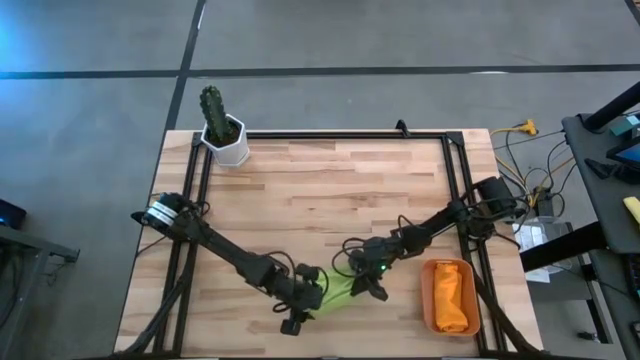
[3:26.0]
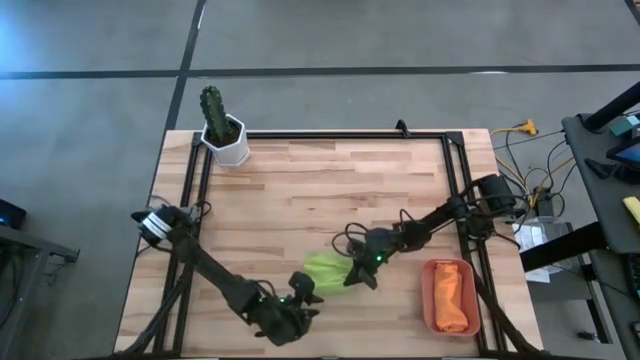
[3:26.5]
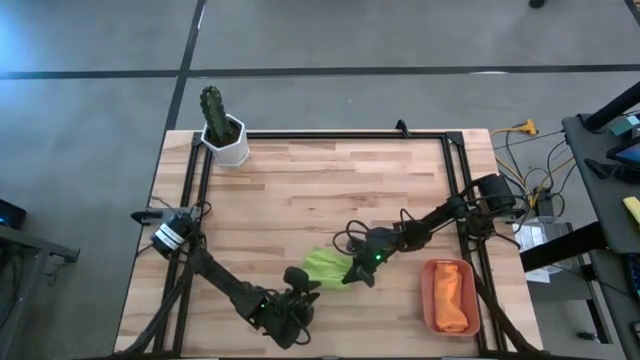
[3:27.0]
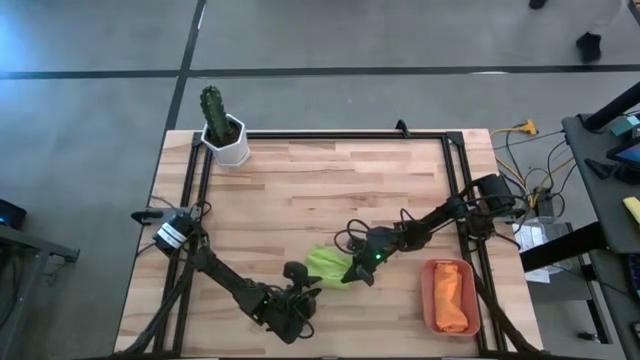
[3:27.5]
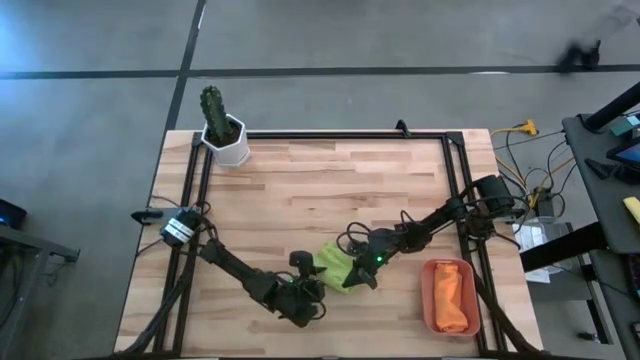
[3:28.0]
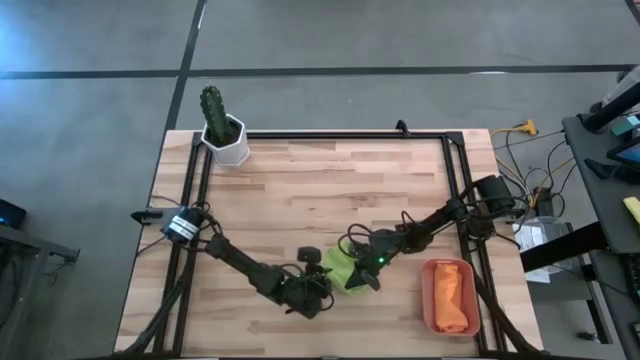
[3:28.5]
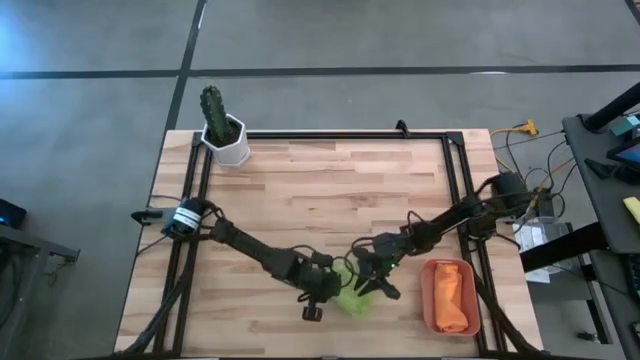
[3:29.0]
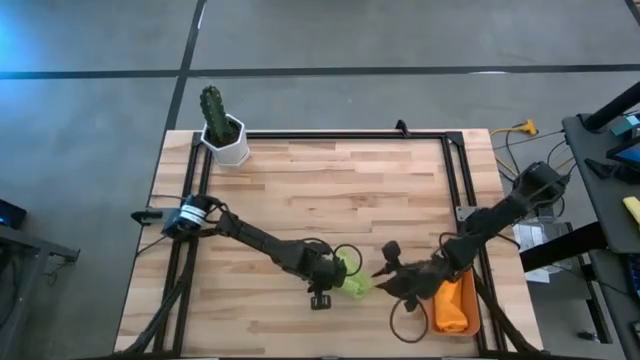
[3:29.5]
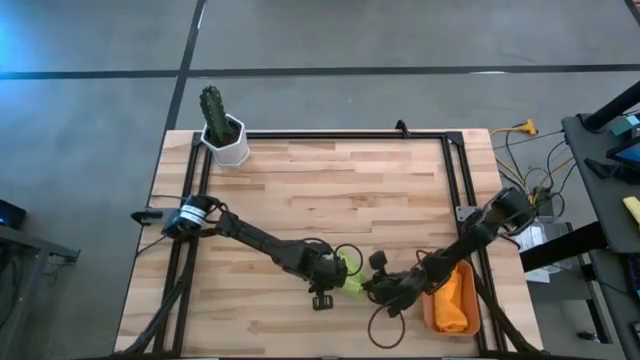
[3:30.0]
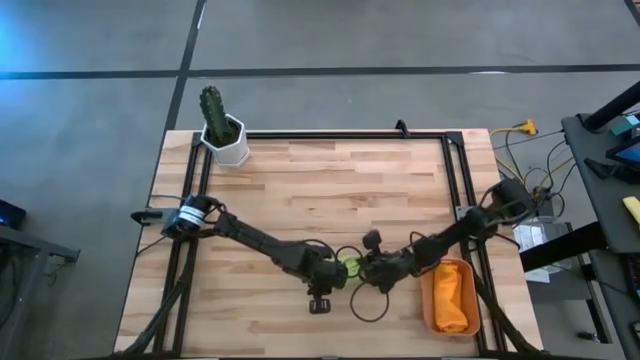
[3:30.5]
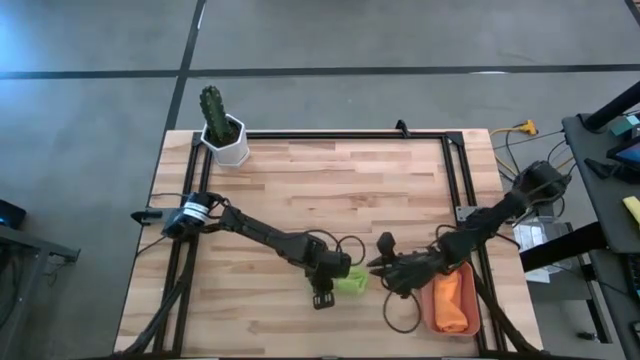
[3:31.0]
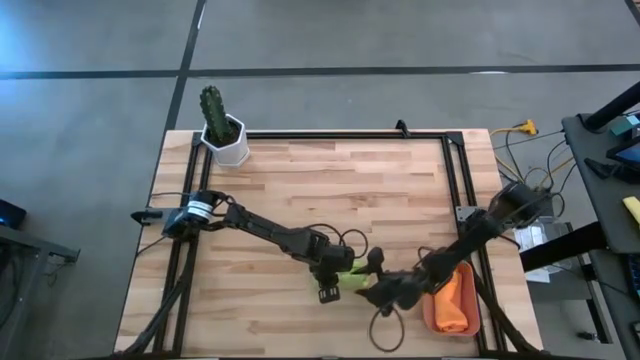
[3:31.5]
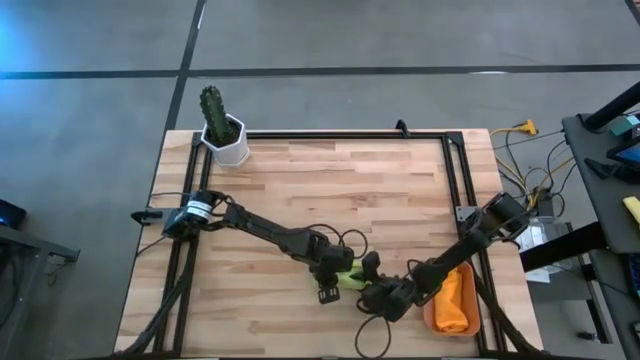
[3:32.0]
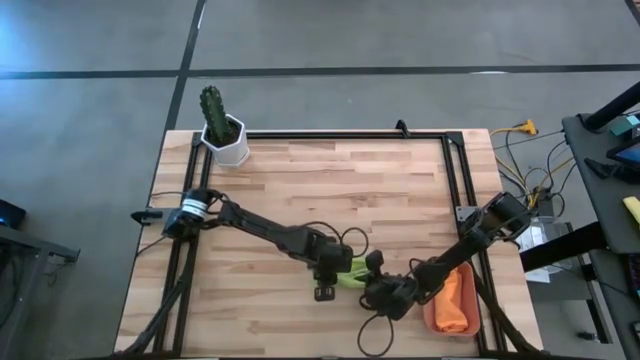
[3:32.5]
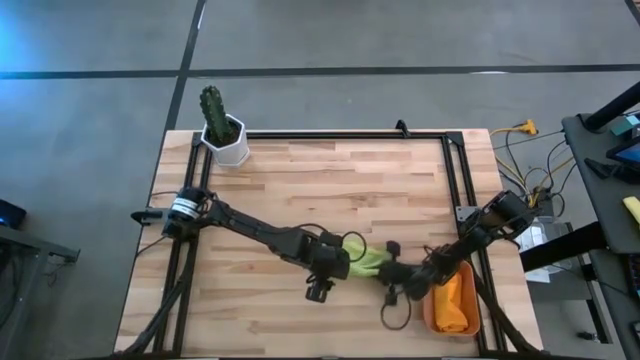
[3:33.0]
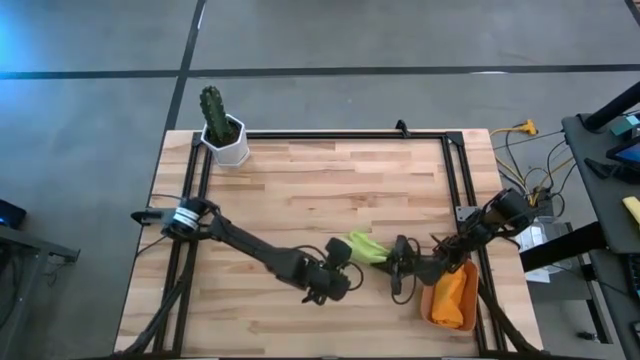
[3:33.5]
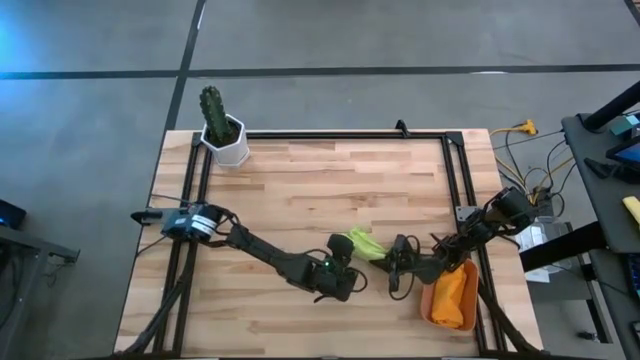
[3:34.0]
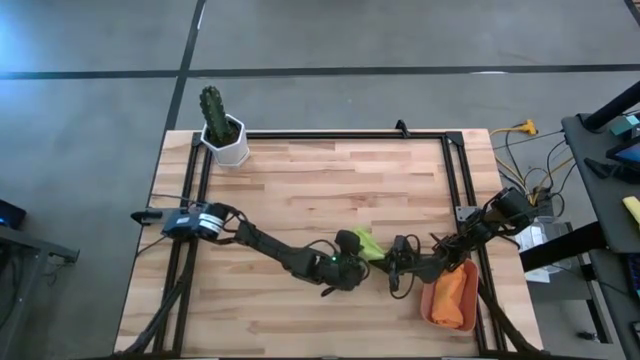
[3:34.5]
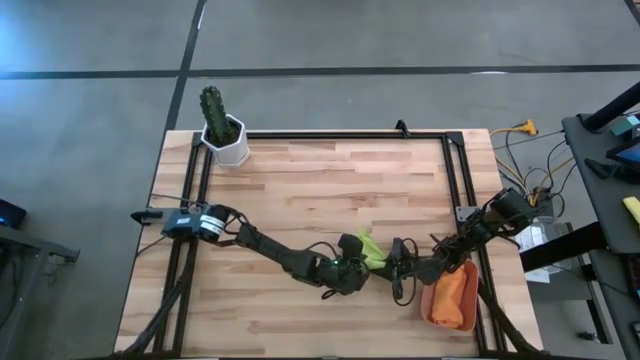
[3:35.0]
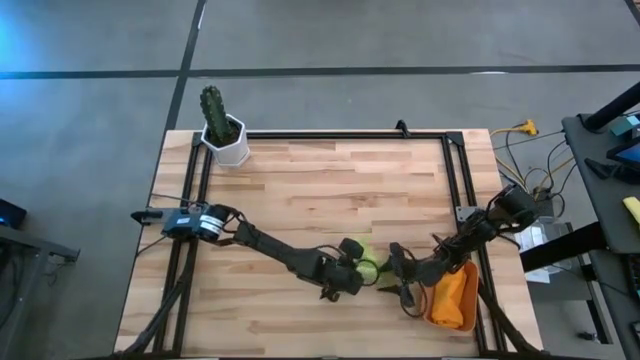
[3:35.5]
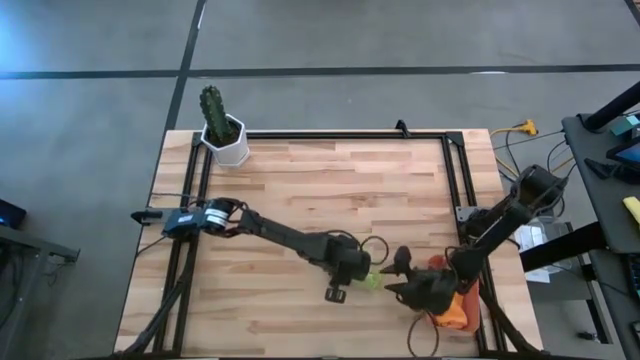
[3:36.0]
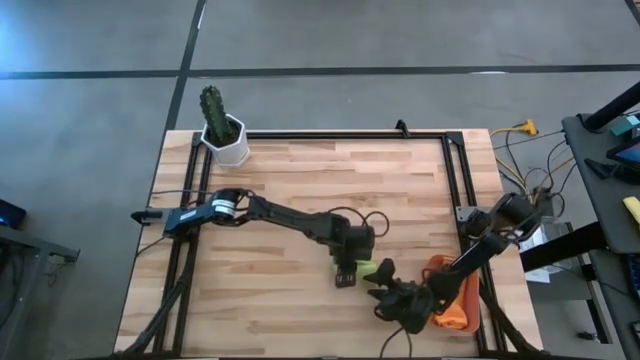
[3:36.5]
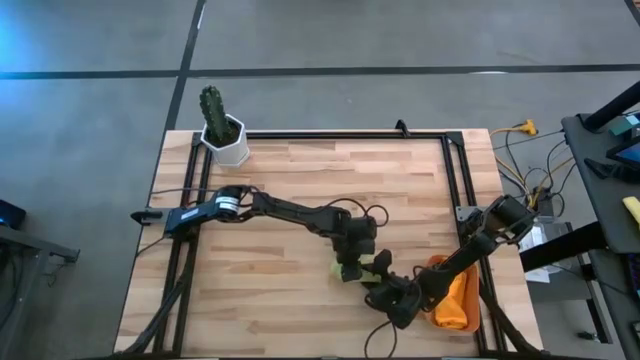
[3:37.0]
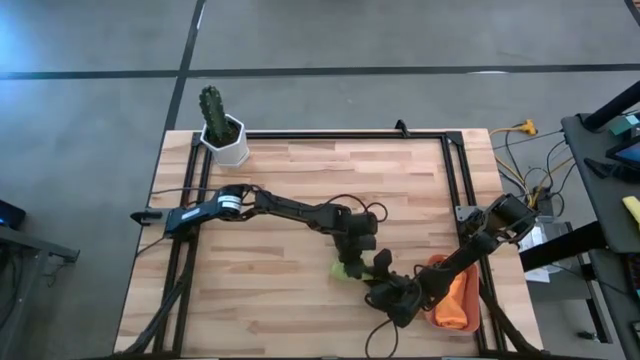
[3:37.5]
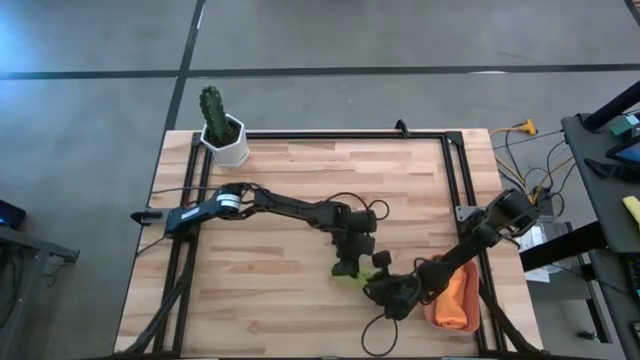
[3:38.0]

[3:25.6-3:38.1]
Task: Roll microfiber towels into tight, uniform cylinder then place into a basket
Roll the green microfiber cloth

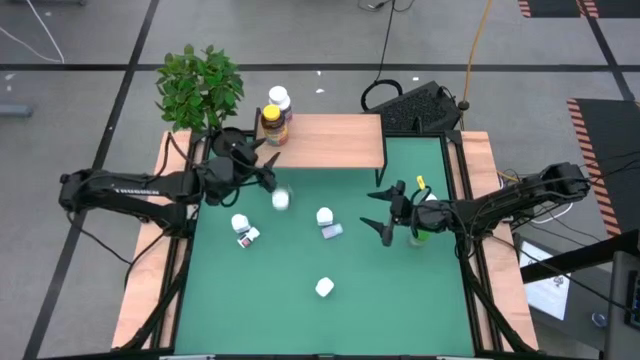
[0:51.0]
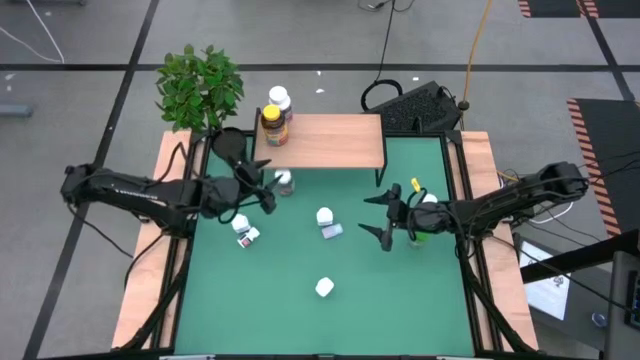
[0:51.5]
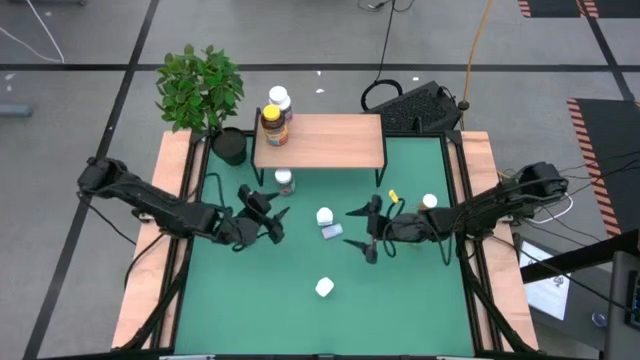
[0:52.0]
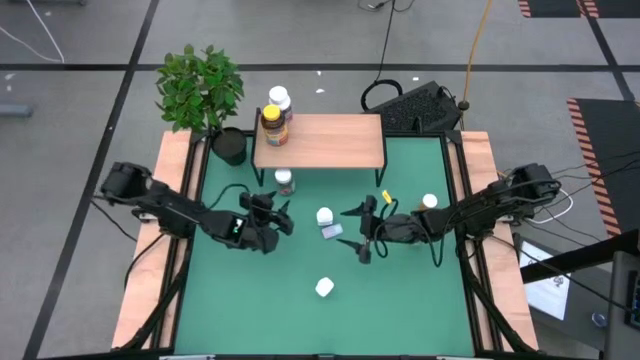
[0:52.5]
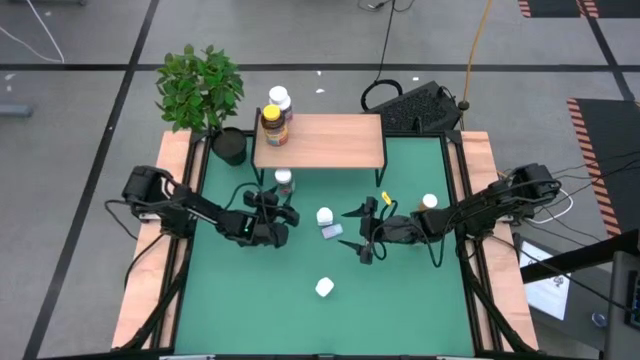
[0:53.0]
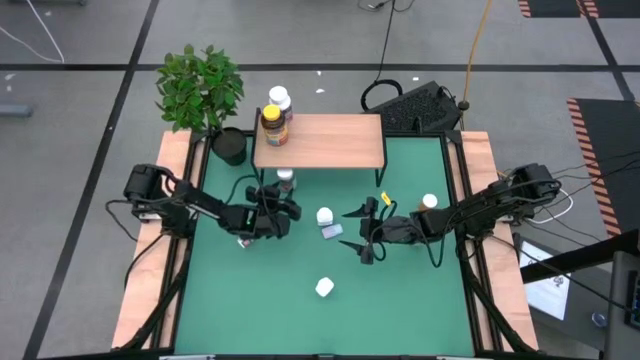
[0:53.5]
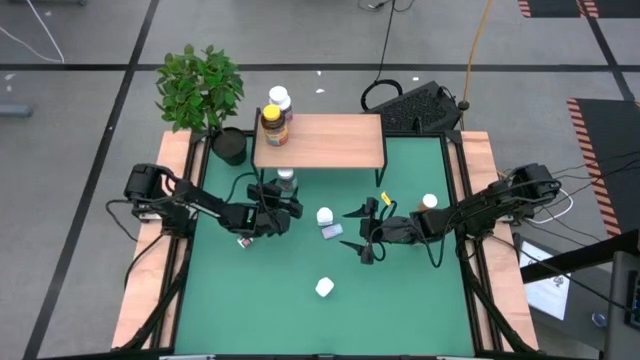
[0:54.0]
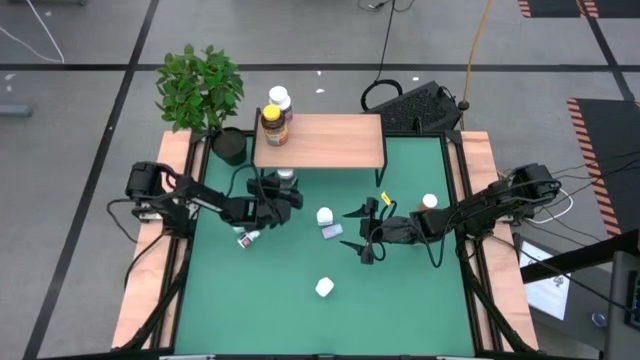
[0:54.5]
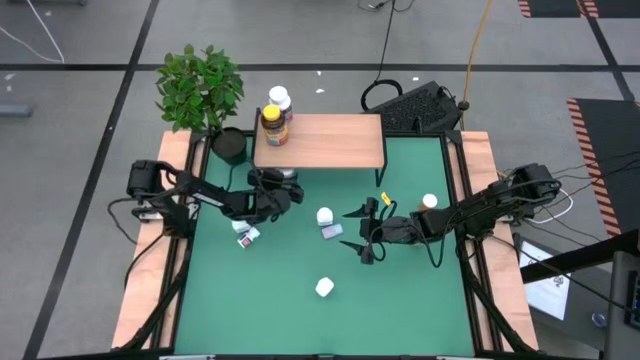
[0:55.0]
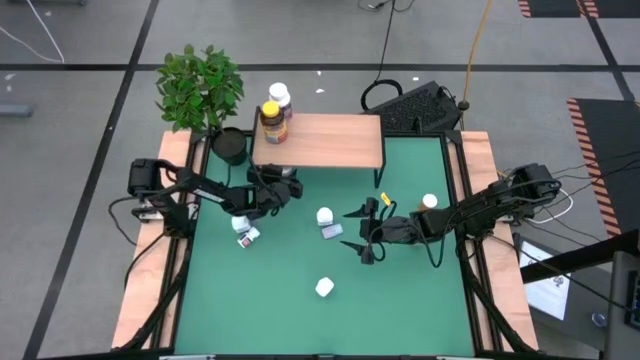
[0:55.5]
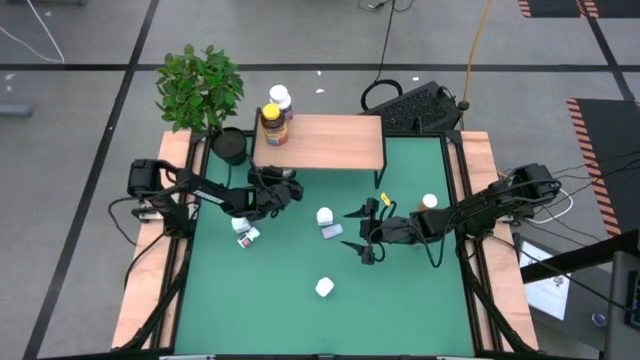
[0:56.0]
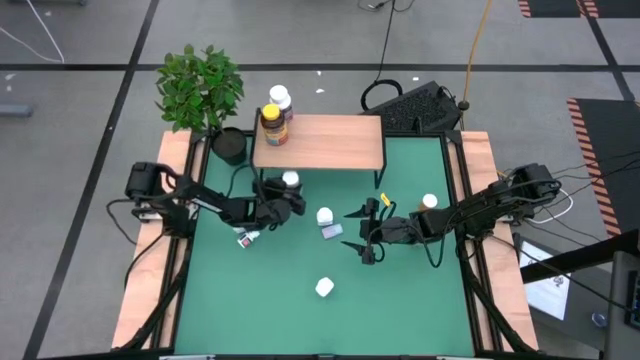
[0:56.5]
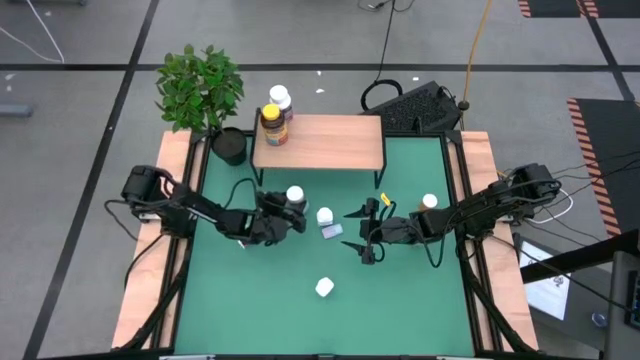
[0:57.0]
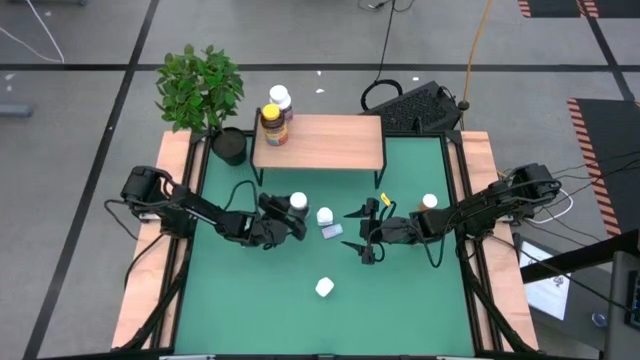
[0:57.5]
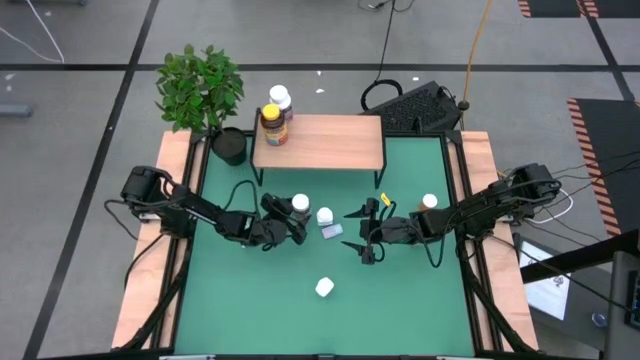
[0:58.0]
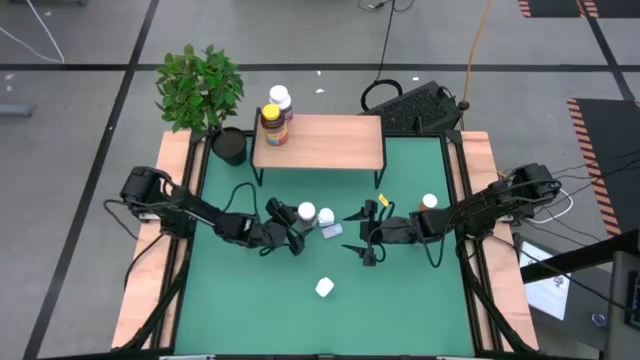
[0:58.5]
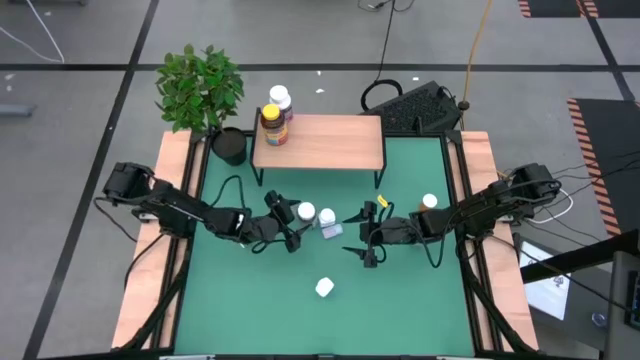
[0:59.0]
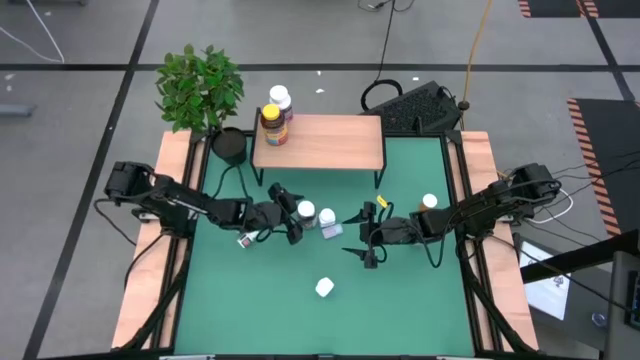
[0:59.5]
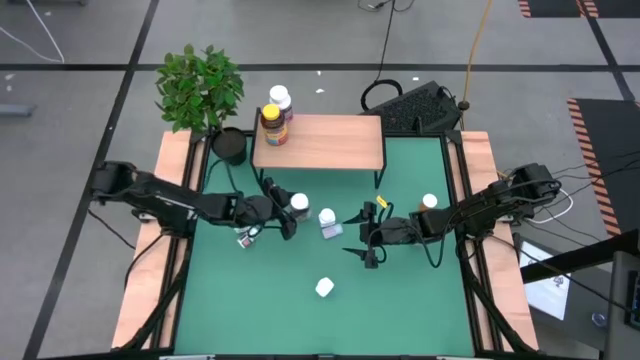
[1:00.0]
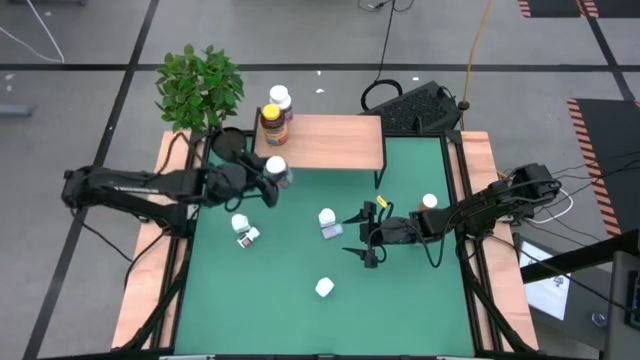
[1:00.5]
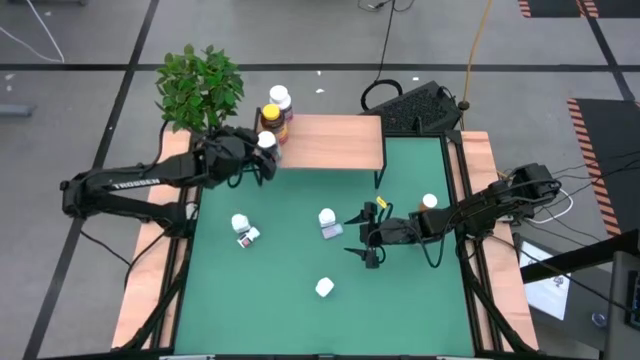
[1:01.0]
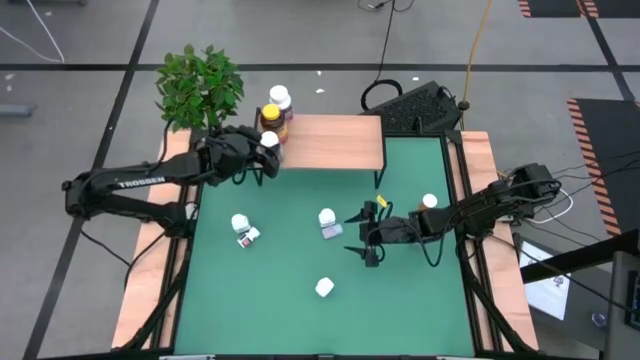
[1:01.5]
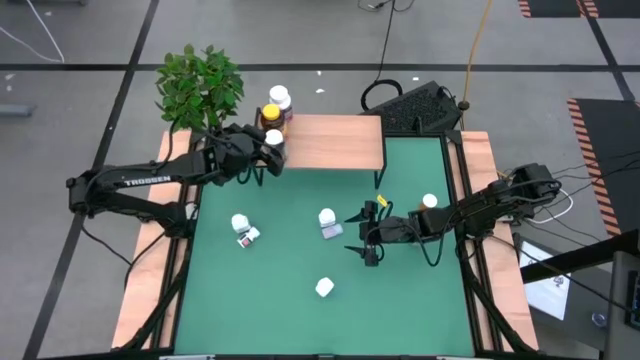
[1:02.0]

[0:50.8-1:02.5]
Task: Pick and place medicine bottles onto shelf by color
Put the large green pill bottle pill on the shelf
